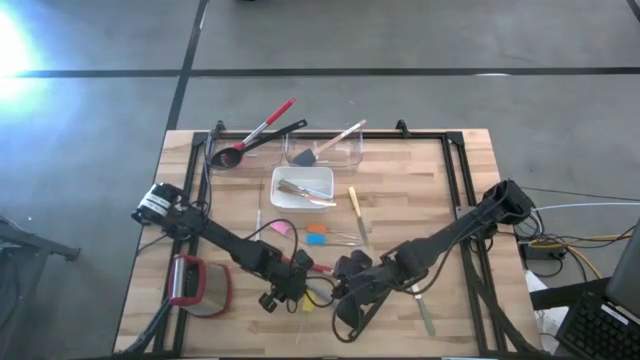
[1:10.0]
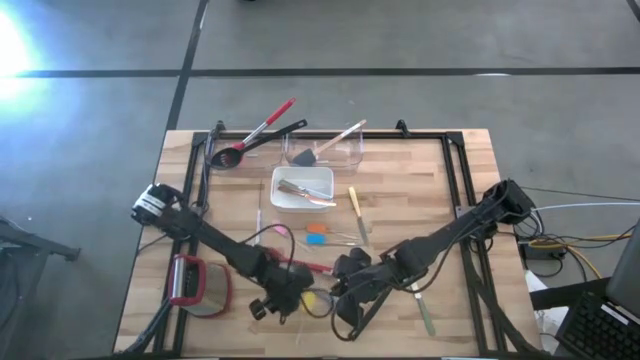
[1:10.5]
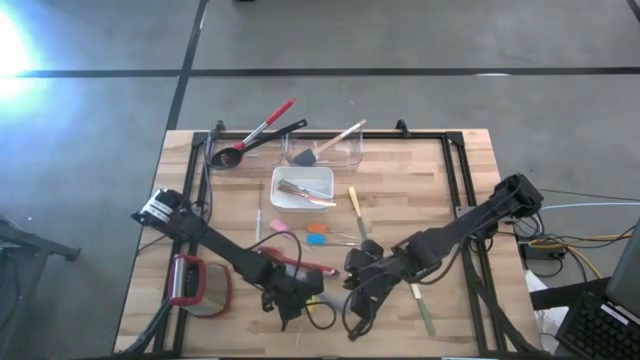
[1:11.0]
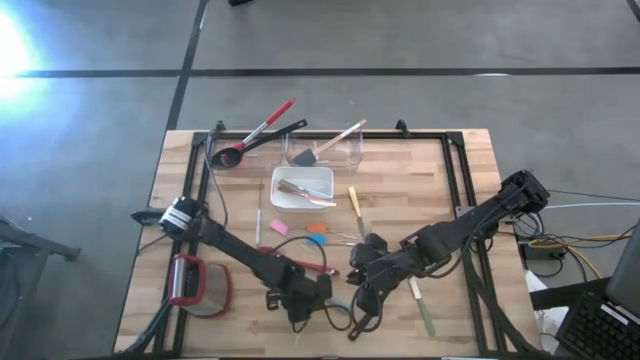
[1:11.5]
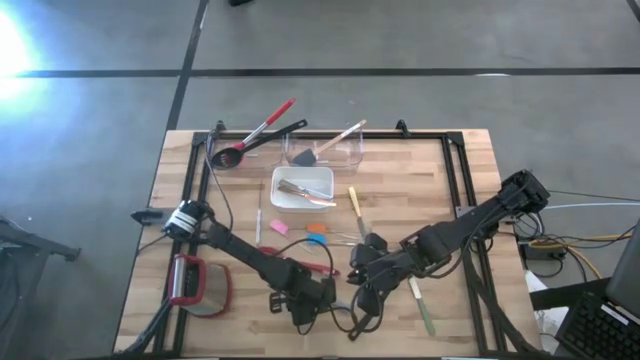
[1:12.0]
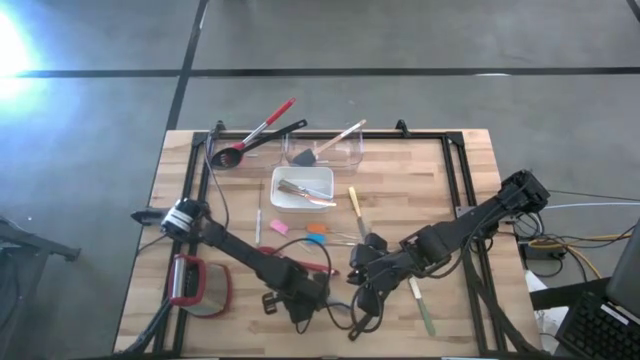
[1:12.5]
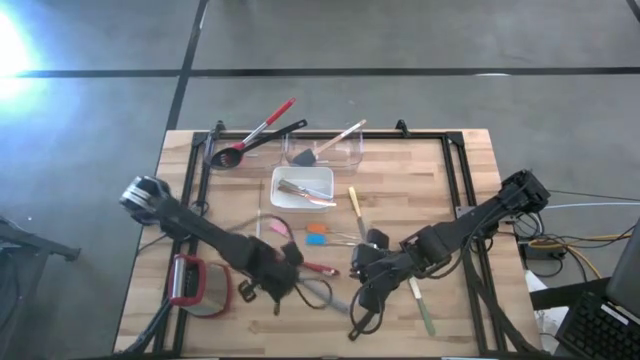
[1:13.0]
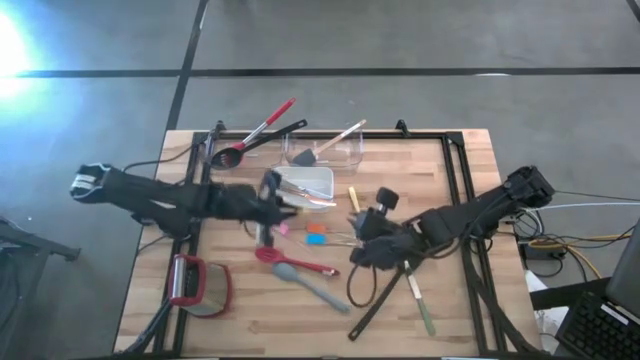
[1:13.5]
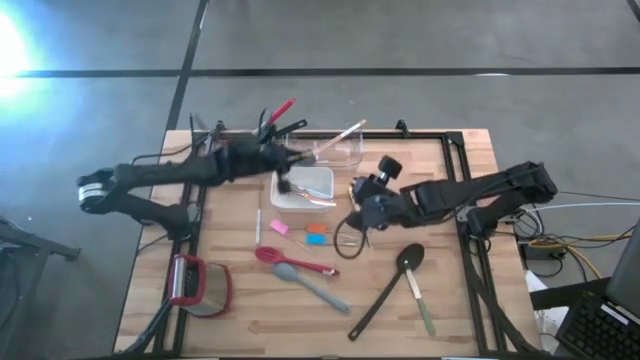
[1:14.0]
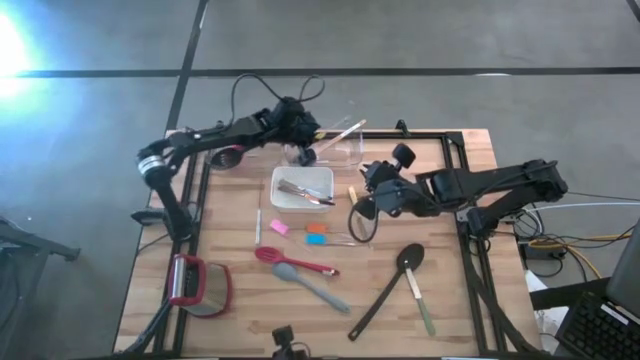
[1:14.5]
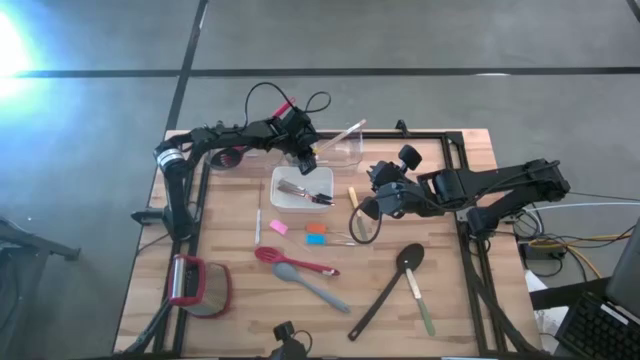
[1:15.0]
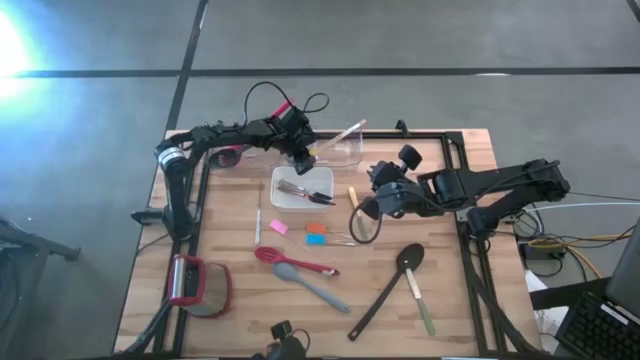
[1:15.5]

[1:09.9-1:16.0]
Task: Pick & Place Kitchen Items
Put the yellow spatula into the right transparent bin

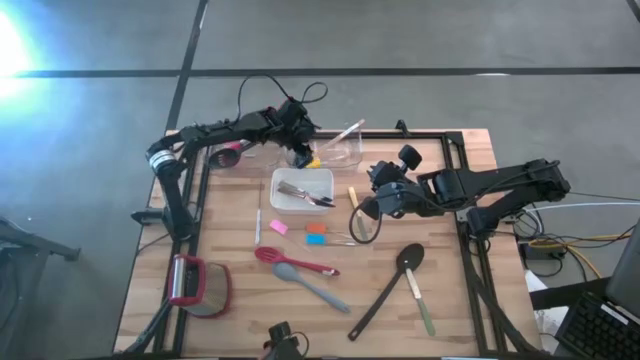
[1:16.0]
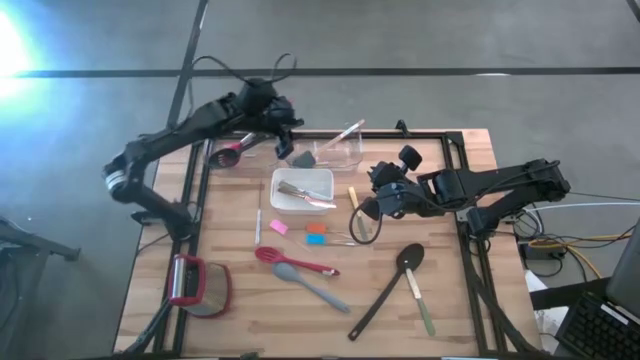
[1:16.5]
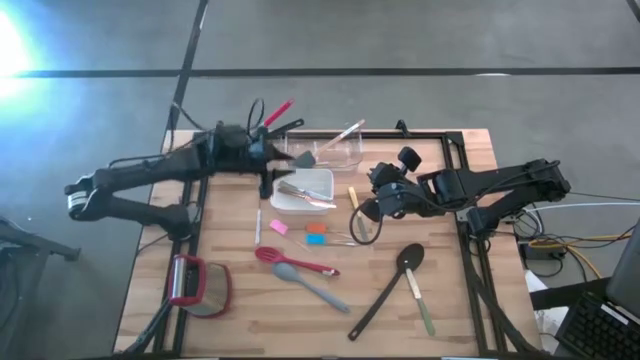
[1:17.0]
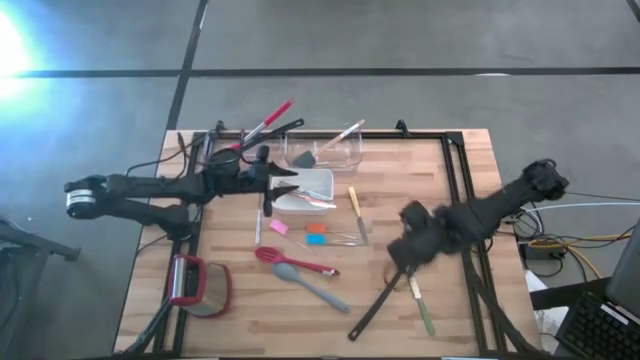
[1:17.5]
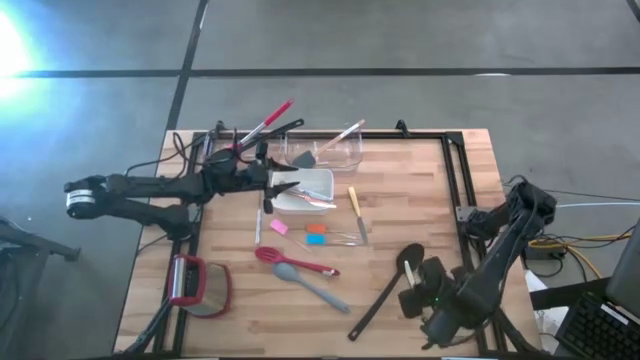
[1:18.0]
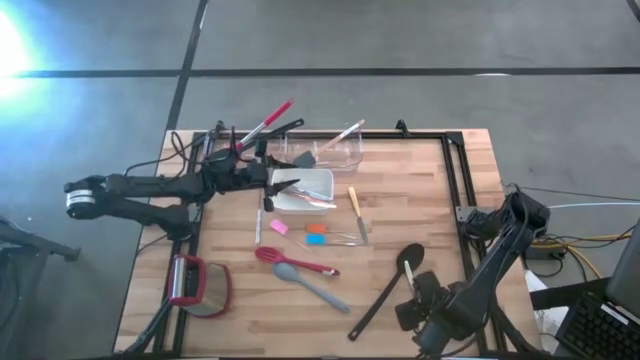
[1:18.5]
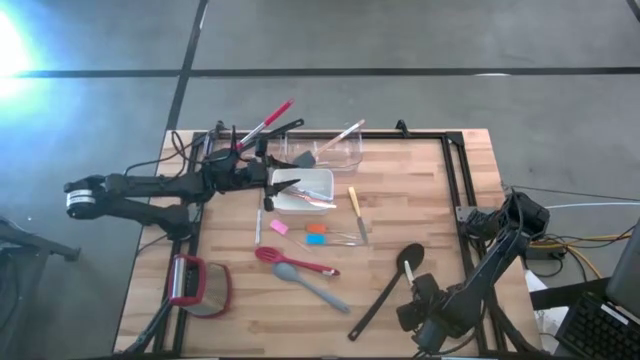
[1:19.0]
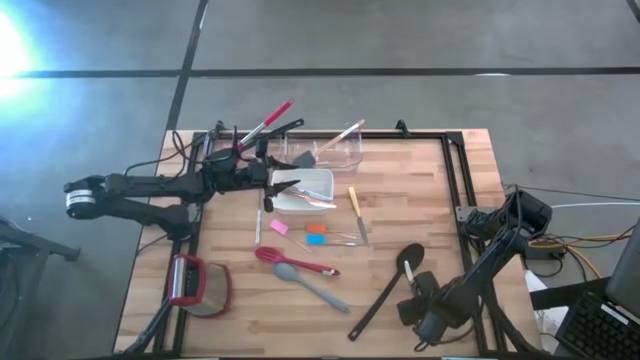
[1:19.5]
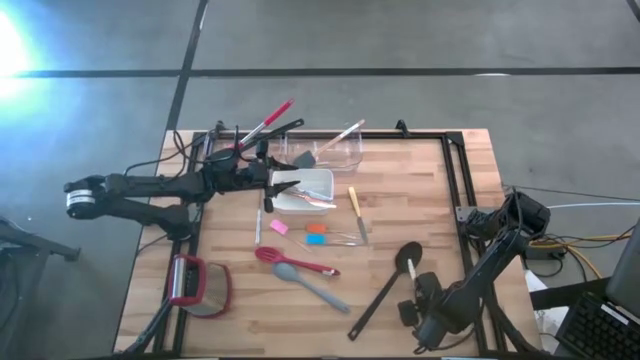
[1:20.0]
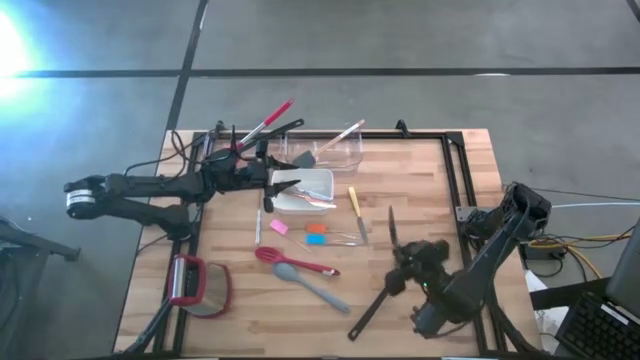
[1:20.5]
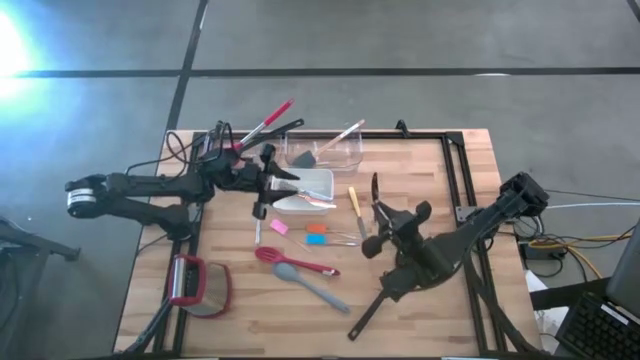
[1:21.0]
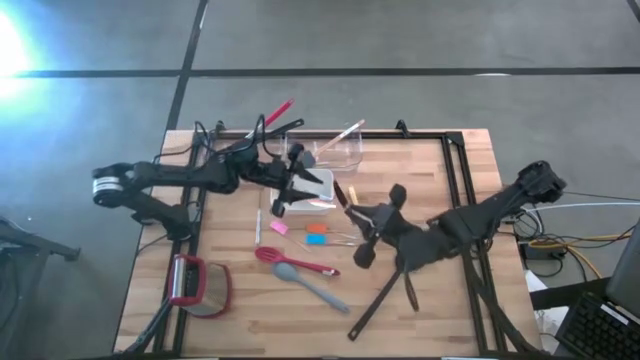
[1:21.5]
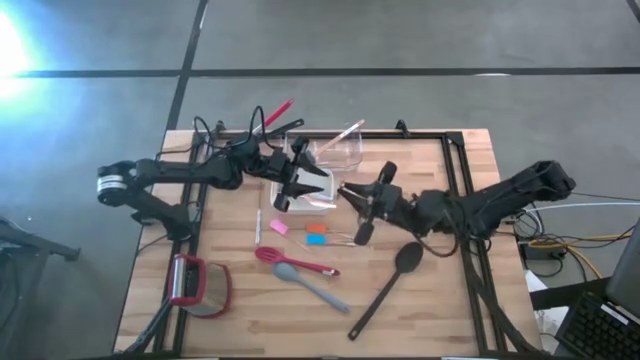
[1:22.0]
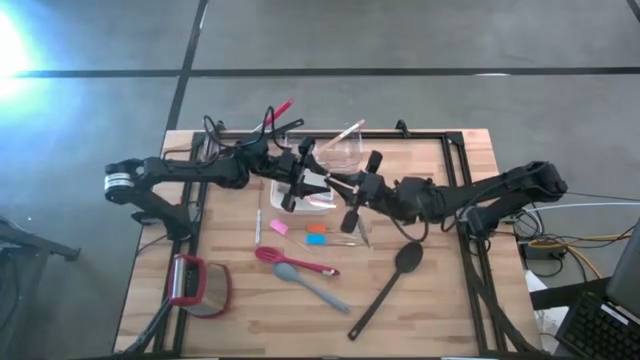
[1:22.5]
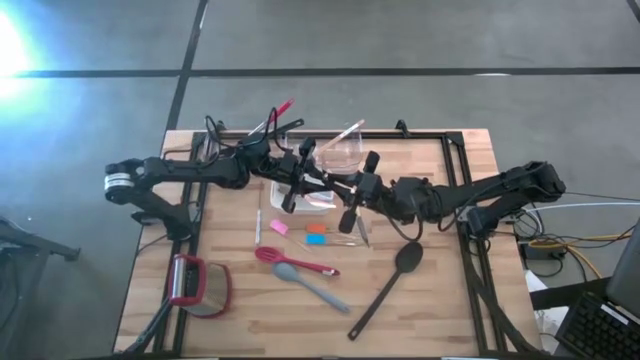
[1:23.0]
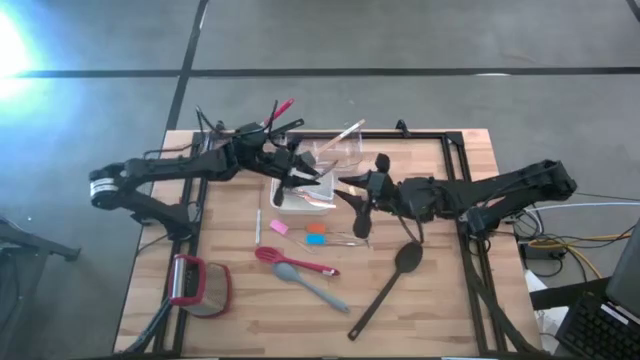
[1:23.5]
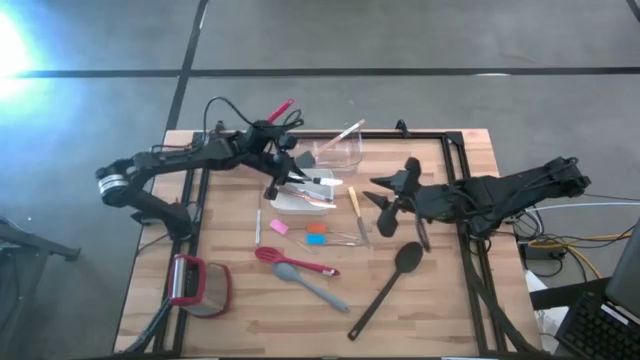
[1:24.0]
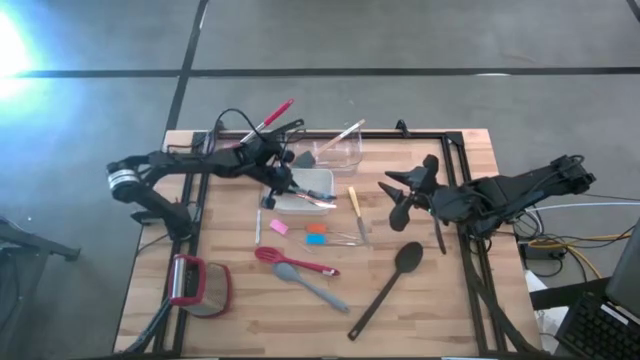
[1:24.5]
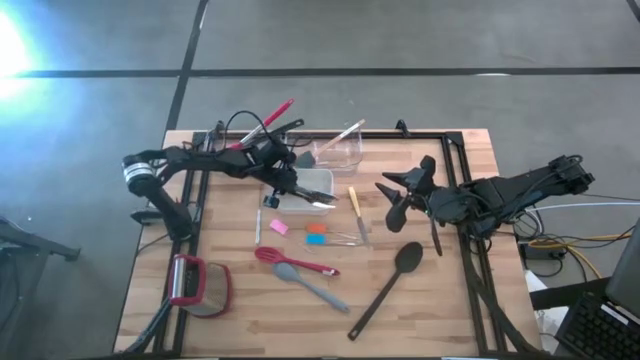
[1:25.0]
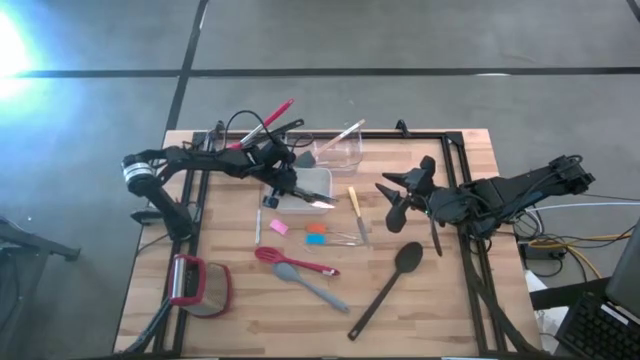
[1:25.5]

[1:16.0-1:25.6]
Put the dark green knife into the white bin

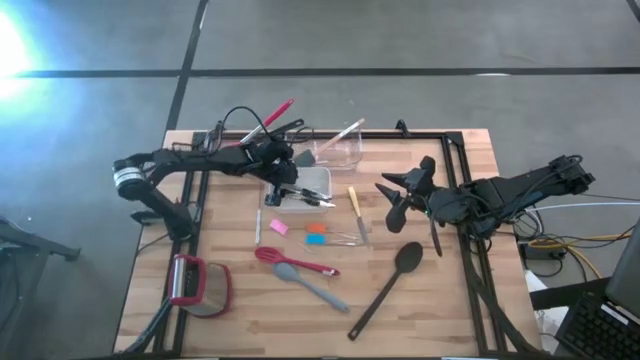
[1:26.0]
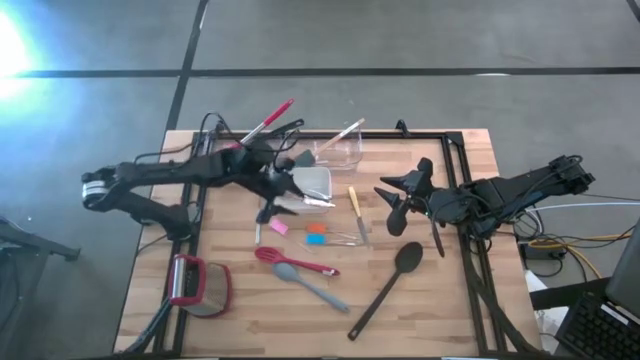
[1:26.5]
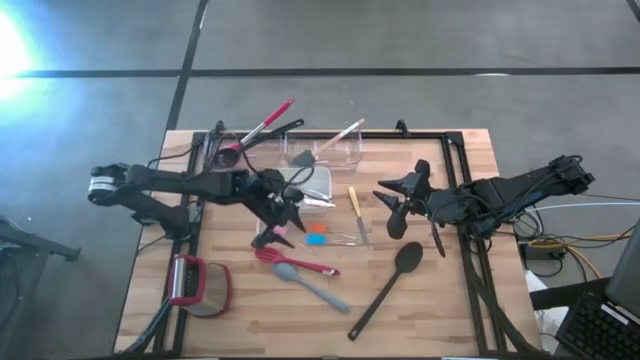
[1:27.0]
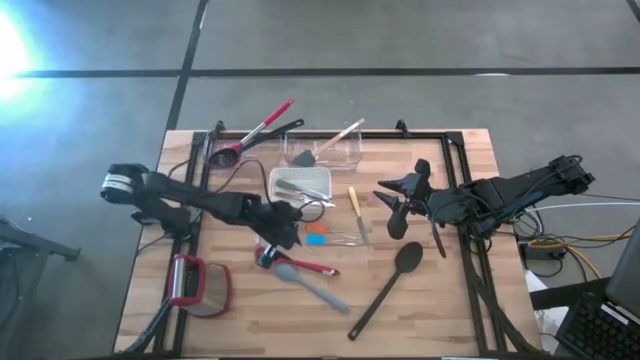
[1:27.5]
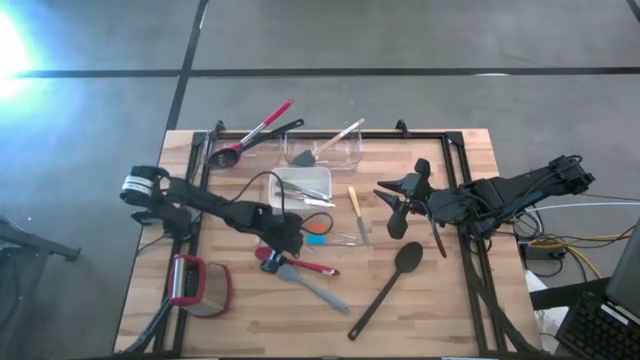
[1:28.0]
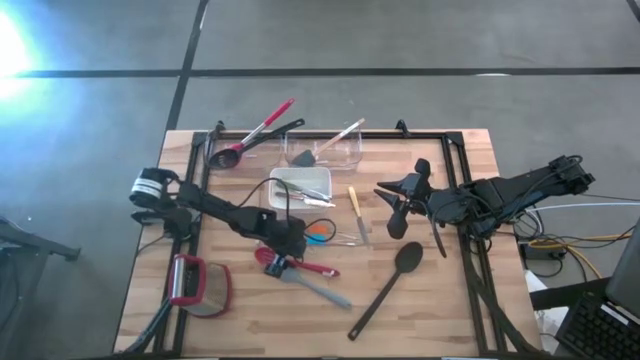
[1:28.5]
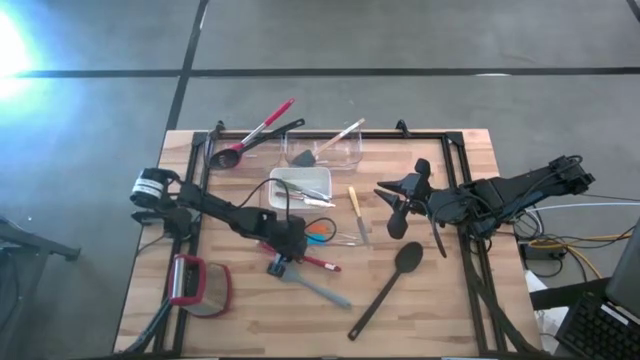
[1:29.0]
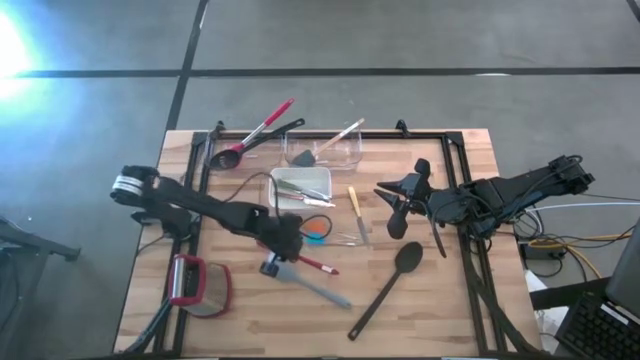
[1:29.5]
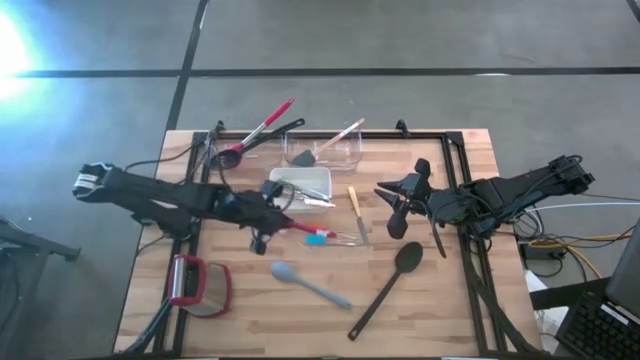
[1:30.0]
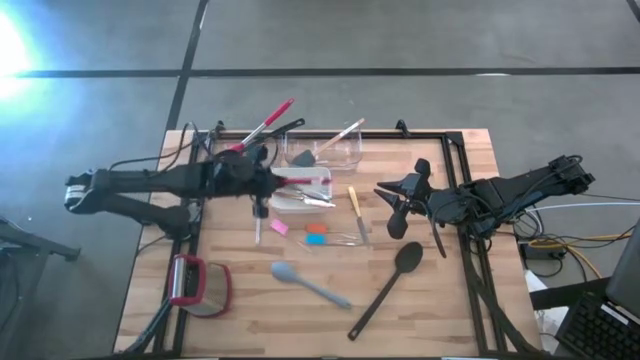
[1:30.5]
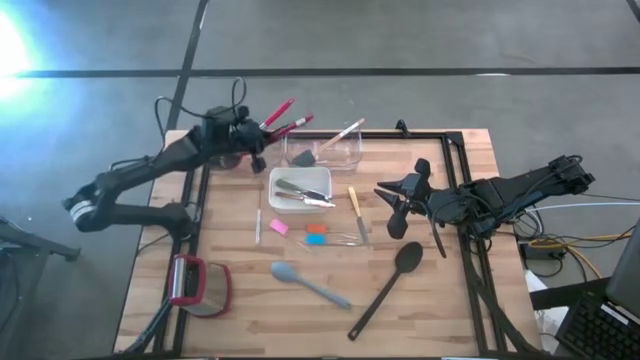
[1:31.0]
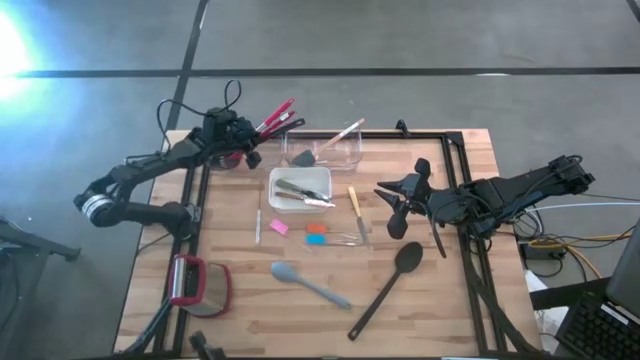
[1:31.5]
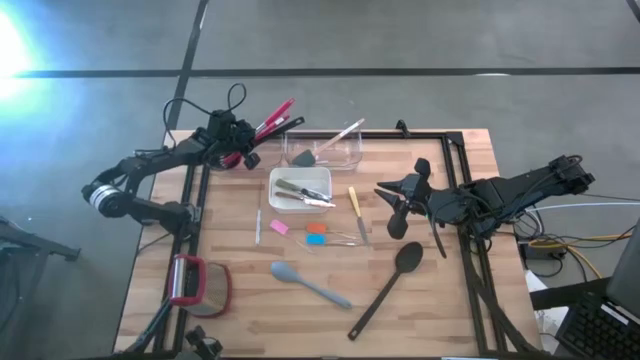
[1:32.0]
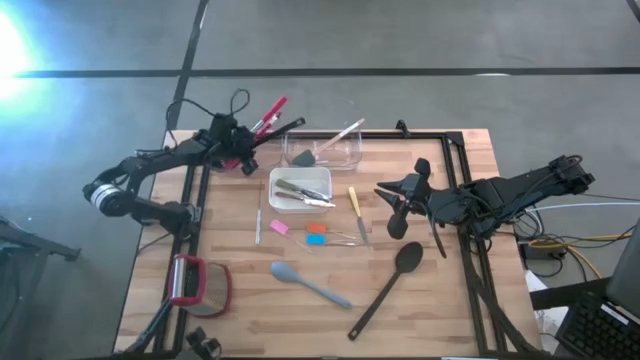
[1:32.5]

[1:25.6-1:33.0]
Put the red slotted serving spoon into the left transparent bin
